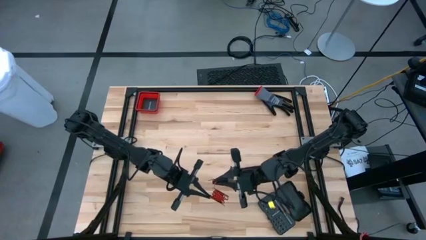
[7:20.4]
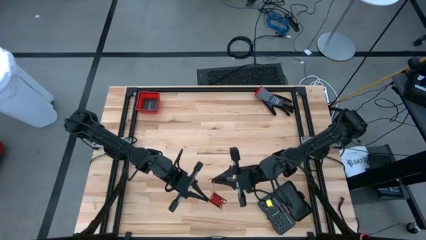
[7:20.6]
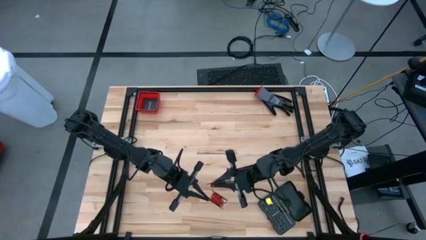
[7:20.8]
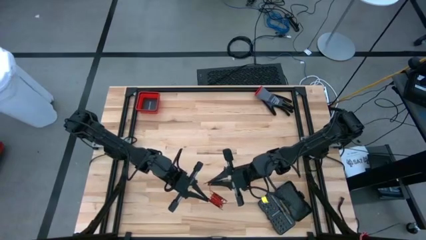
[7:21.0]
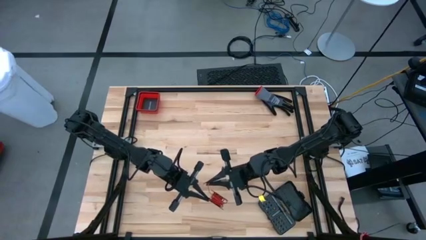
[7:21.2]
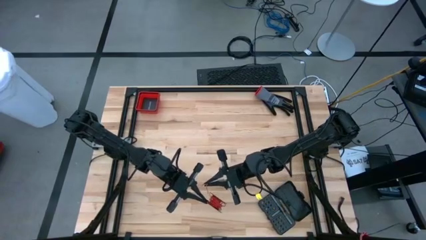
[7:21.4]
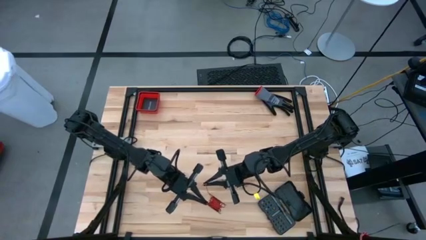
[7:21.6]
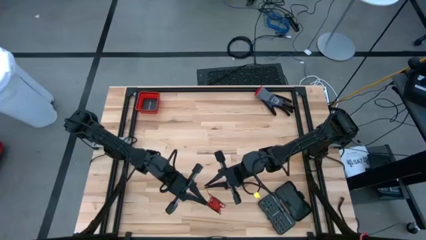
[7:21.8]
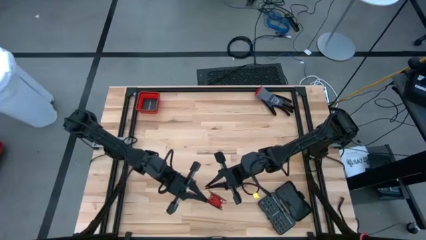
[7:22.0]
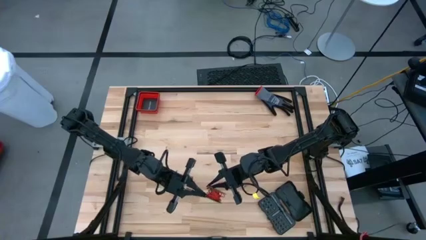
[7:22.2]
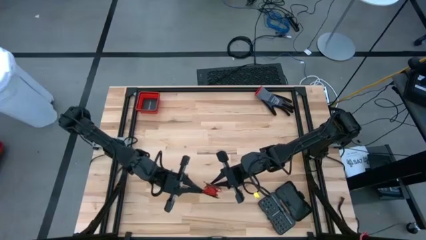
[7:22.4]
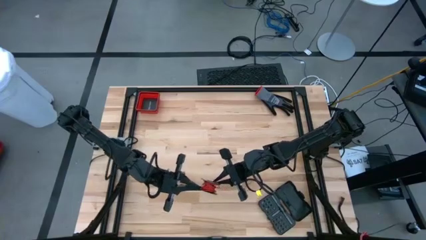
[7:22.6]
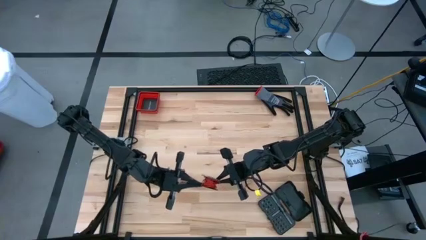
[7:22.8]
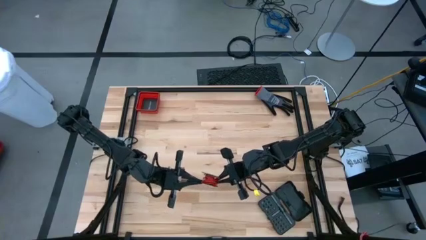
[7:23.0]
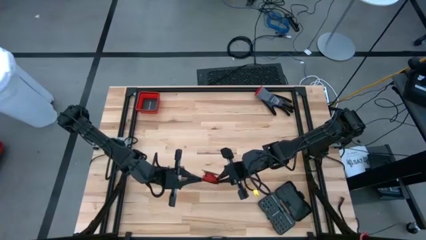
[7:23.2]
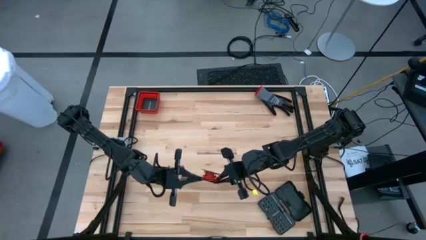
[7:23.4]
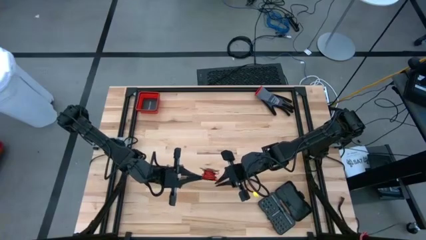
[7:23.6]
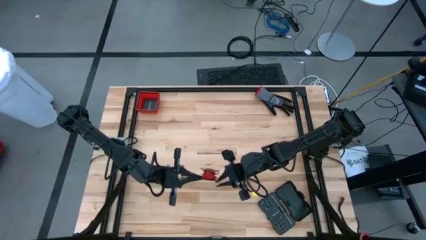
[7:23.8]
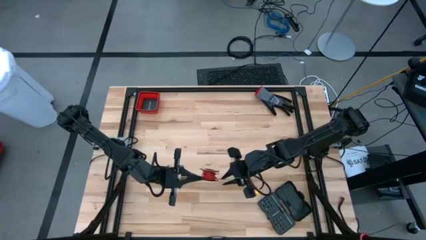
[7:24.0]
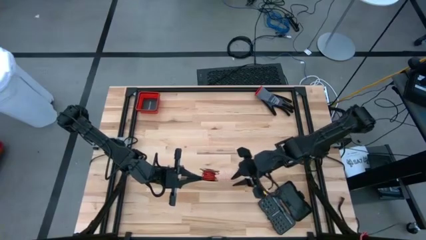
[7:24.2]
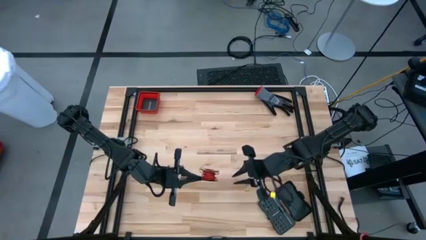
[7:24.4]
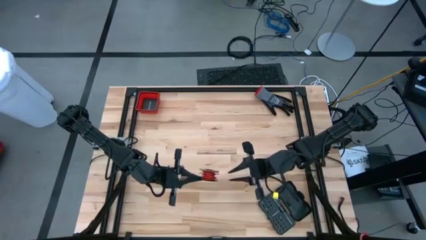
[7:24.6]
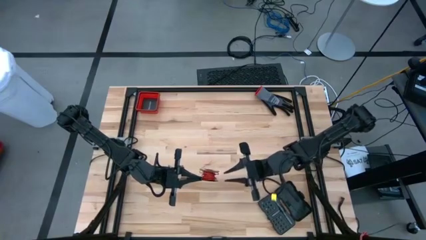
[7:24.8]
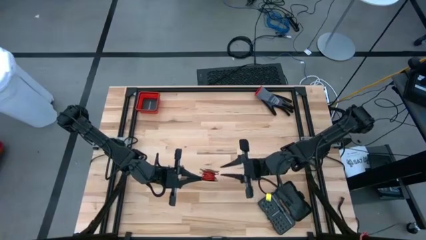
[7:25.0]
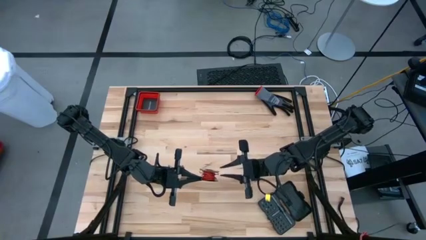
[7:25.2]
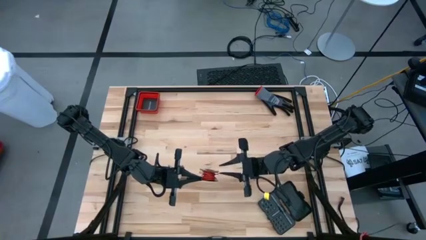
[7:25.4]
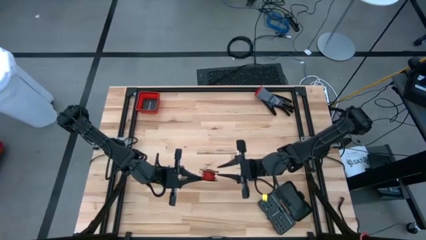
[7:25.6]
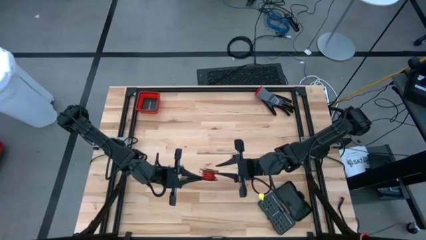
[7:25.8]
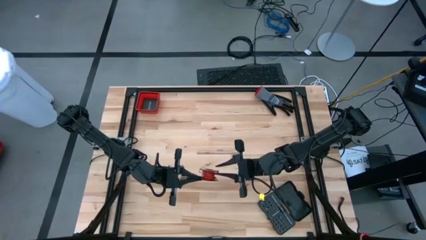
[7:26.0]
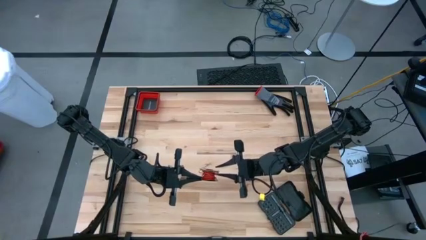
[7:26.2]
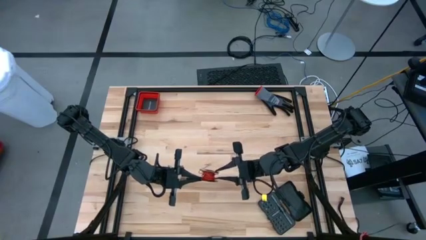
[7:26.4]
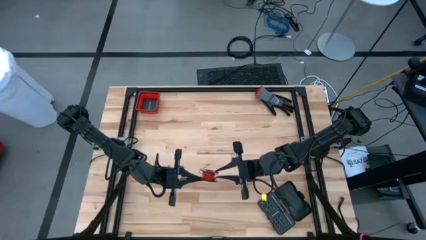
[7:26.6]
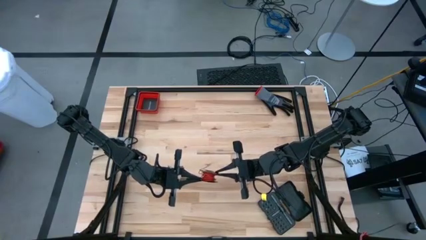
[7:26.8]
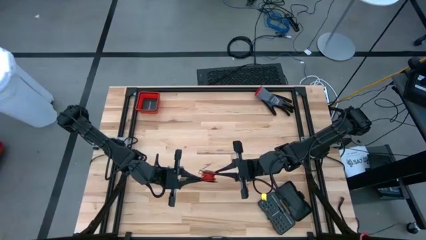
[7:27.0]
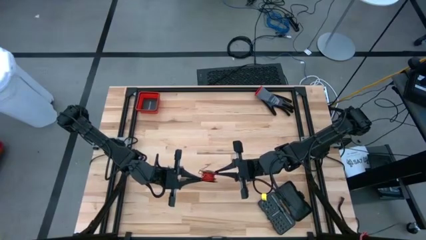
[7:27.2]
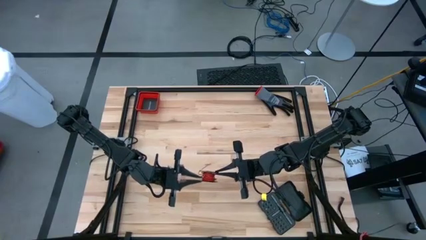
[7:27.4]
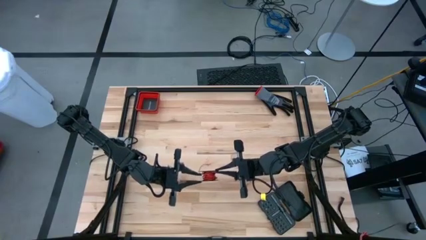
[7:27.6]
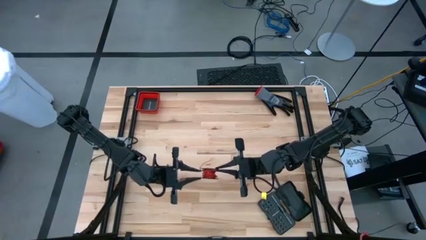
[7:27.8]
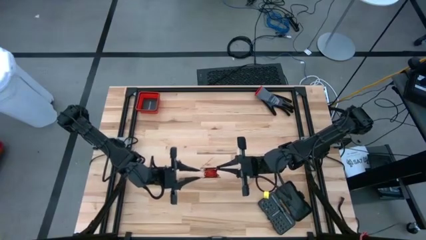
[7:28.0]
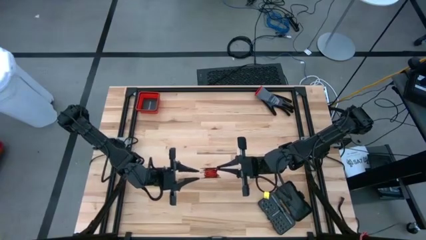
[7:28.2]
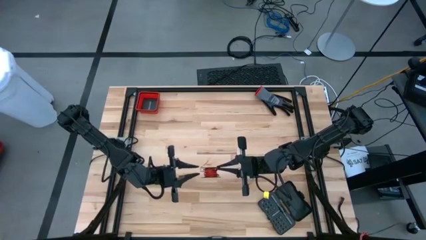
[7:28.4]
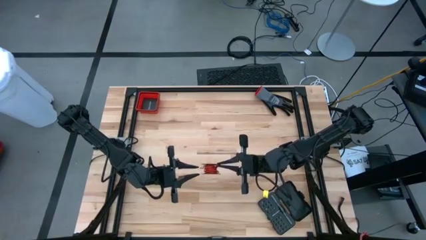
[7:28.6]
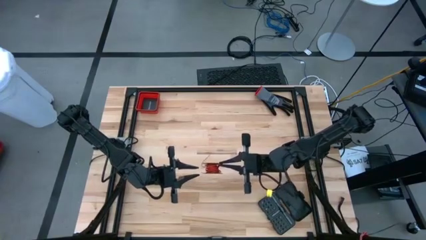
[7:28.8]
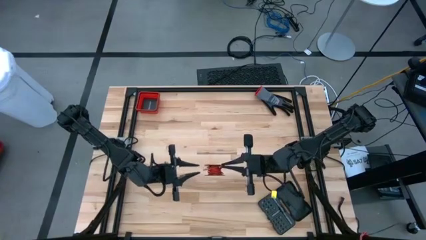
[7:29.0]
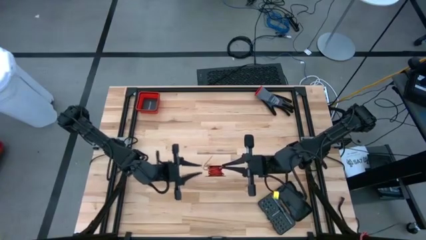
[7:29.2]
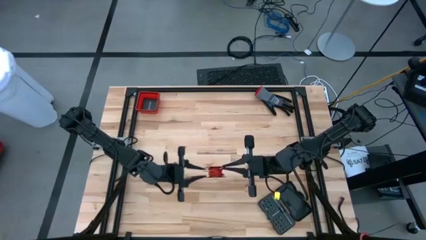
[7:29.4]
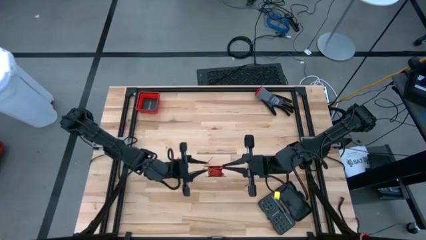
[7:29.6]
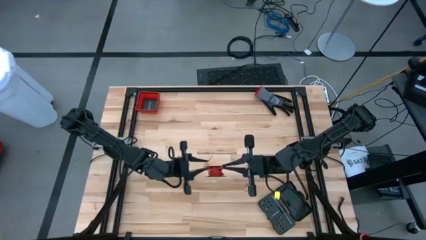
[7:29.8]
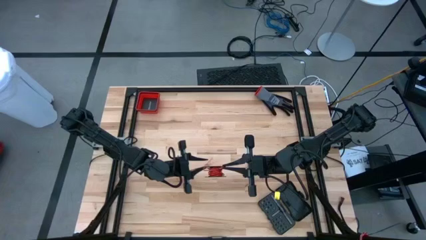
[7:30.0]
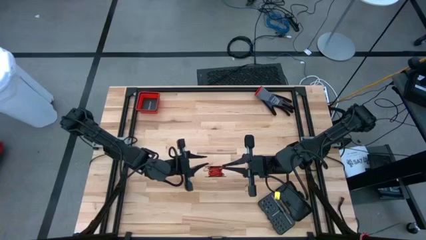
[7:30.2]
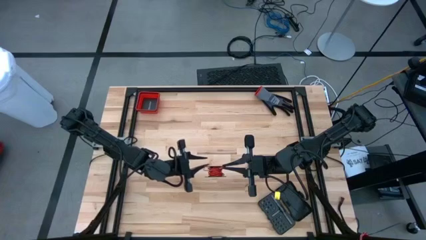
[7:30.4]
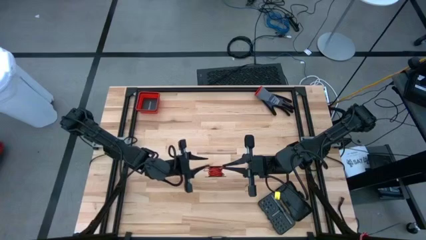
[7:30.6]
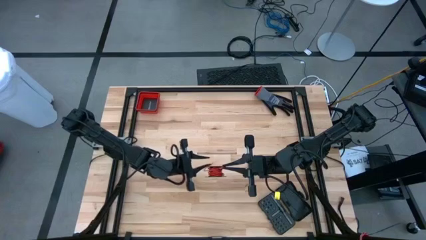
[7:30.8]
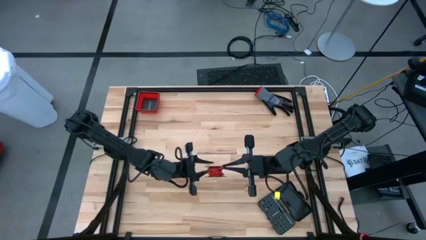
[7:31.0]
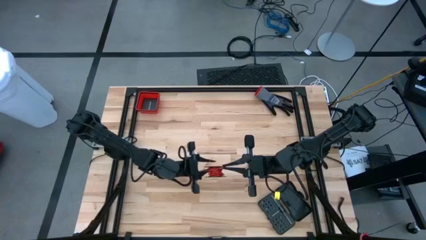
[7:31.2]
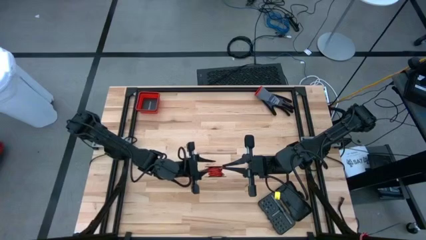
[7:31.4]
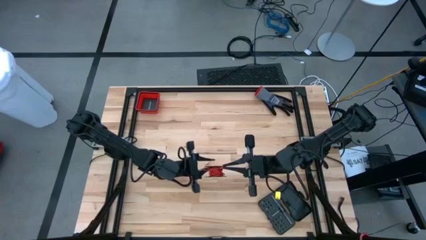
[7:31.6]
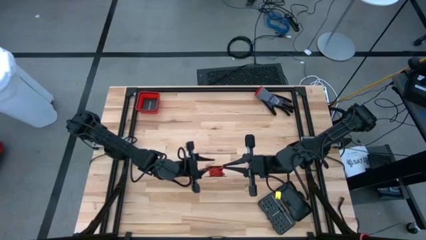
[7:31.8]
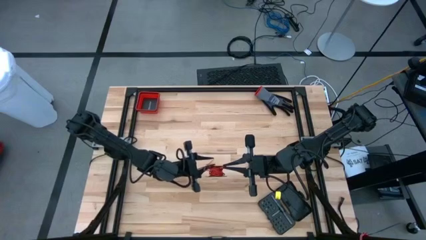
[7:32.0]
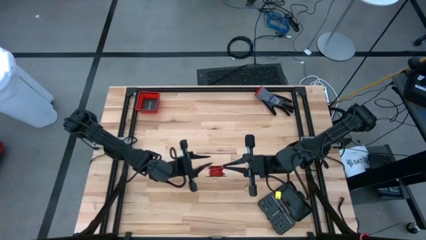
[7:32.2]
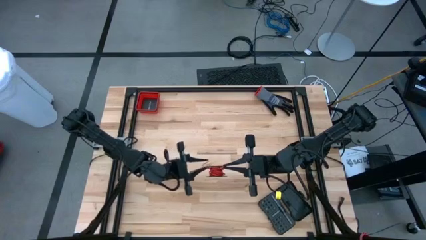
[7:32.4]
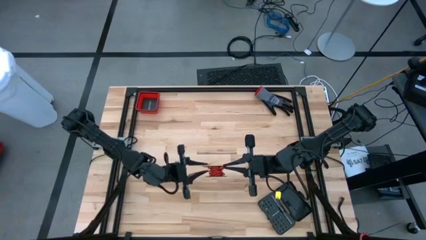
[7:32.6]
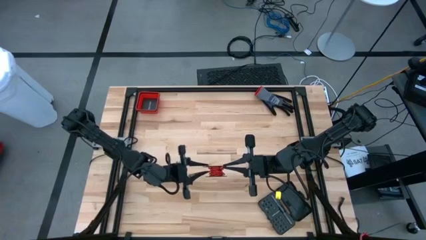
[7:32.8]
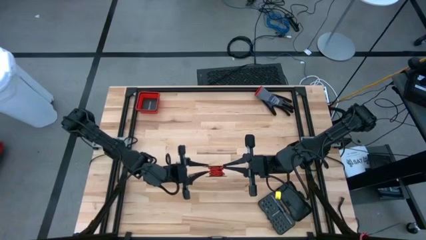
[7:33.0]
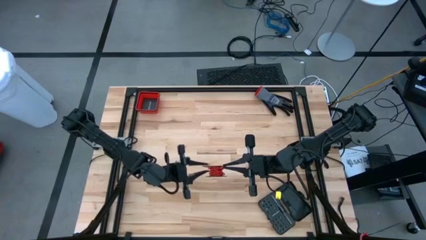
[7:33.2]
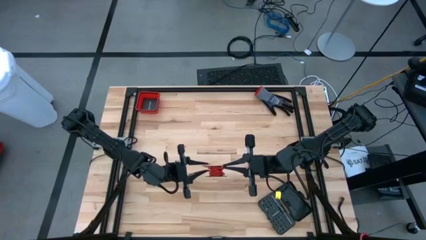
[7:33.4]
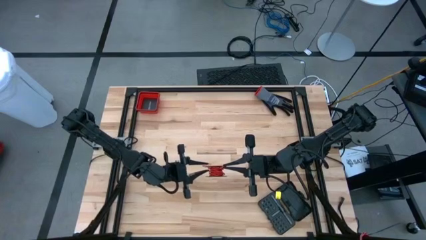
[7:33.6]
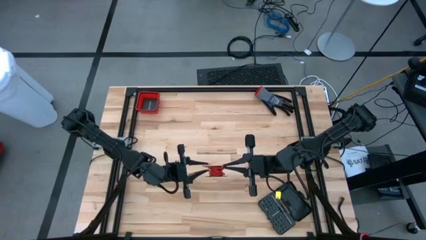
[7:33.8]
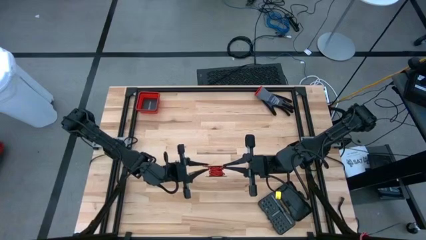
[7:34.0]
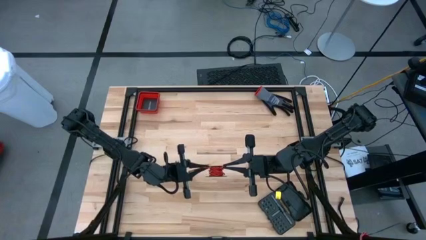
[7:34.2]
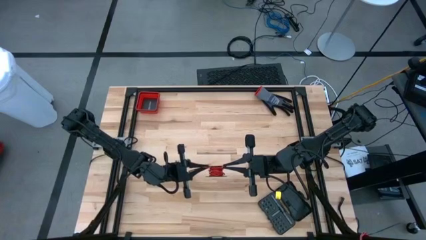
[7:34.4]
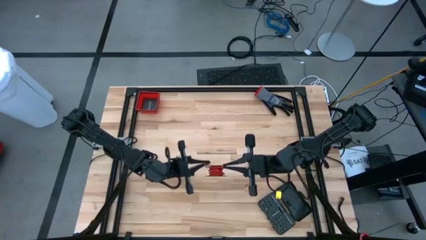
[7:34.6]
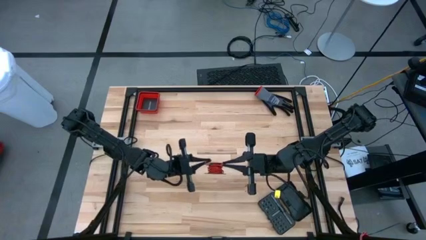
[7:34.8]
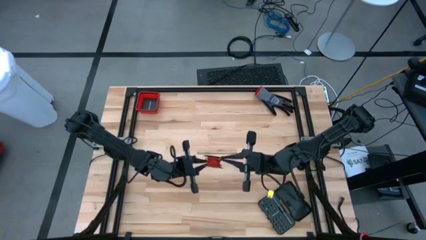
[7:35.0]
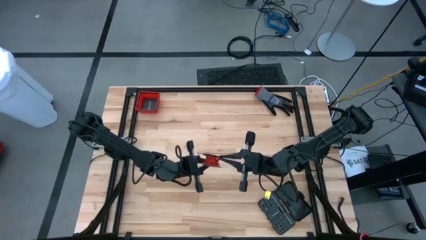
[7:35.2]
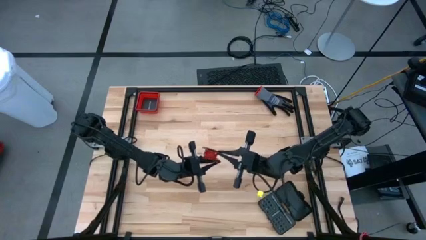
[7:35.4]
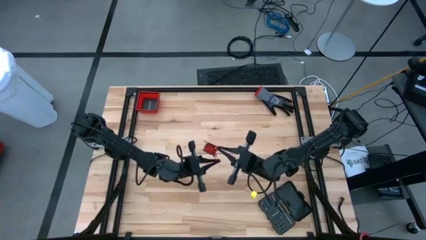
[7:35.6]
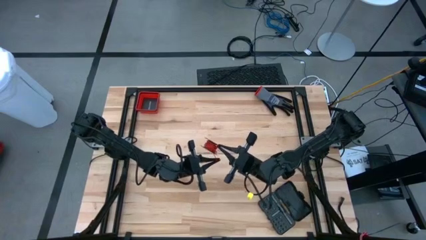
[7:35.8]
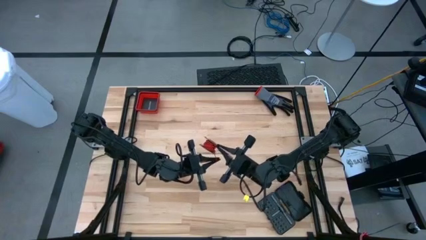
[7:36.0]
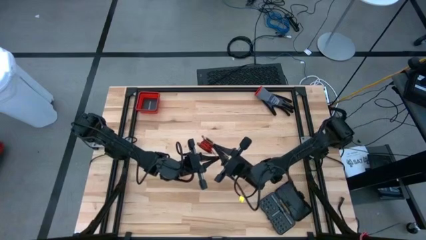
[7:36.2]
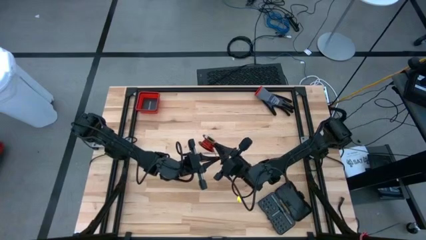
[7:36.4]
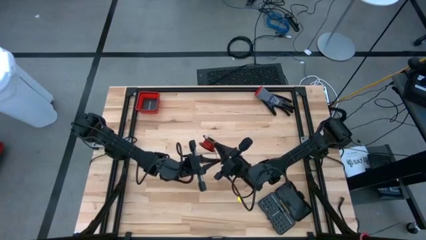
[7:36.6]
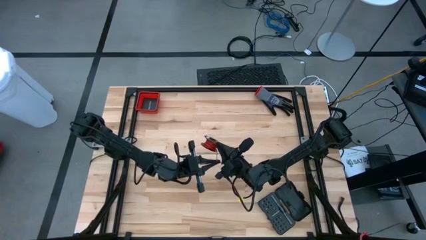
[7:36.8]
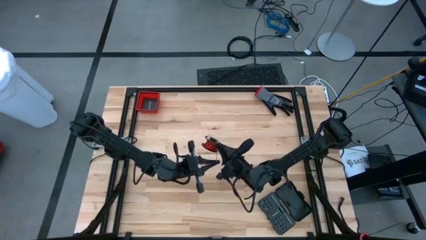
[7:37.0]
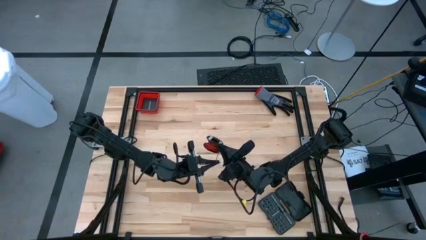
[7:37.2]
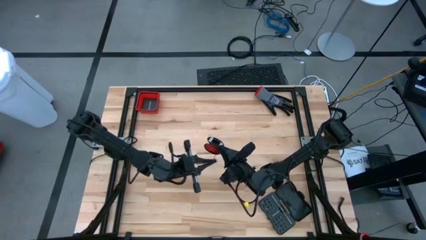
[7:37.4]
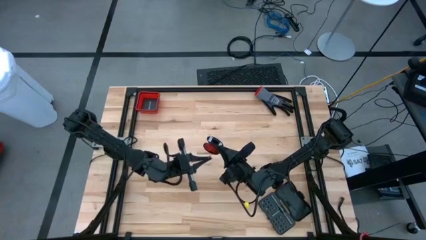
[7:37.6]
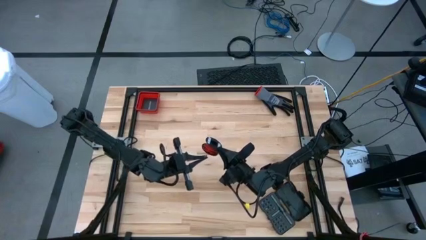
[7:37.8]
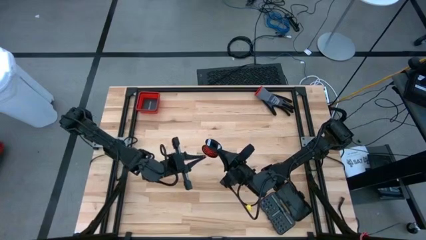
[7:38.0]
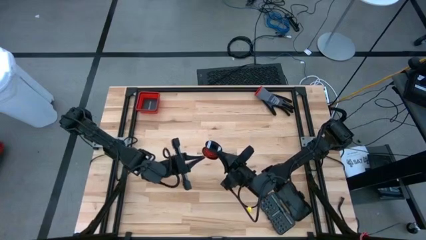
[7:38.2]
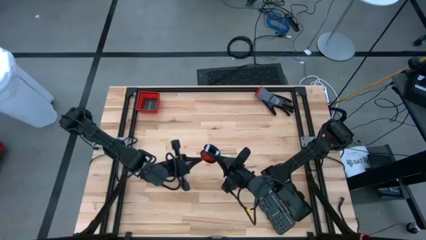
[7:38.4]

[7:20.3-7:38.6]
Task: Coil cords
Coil the red wire onto the spool
